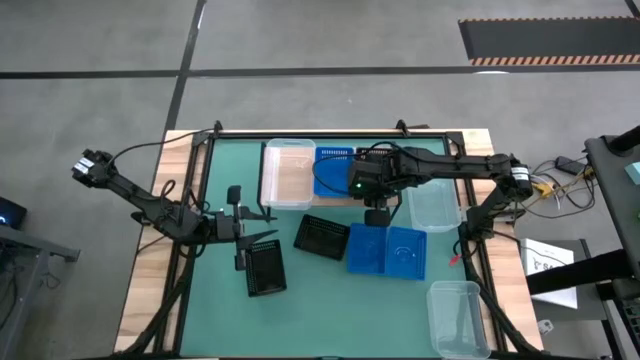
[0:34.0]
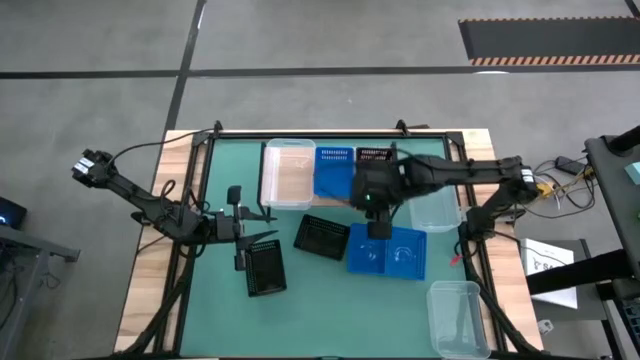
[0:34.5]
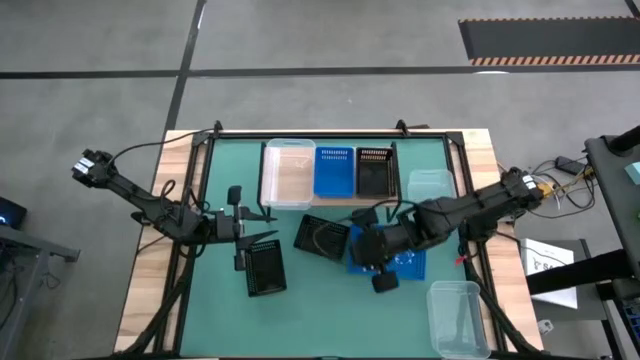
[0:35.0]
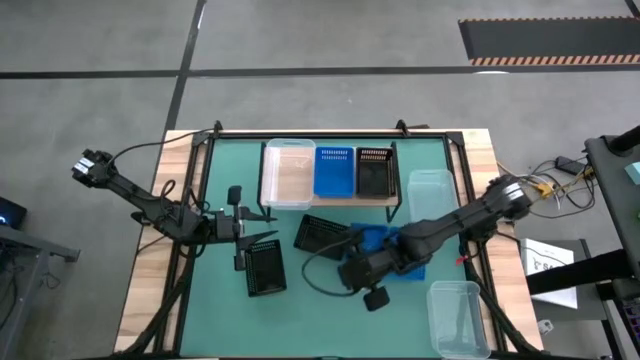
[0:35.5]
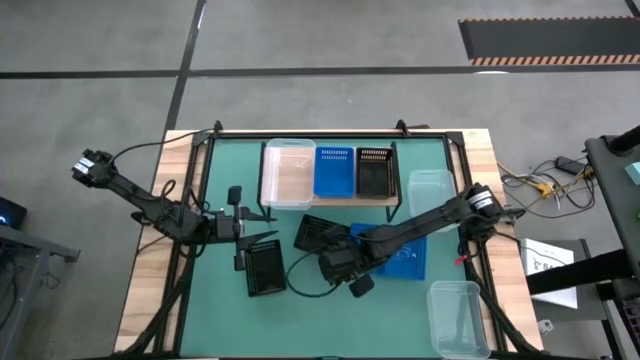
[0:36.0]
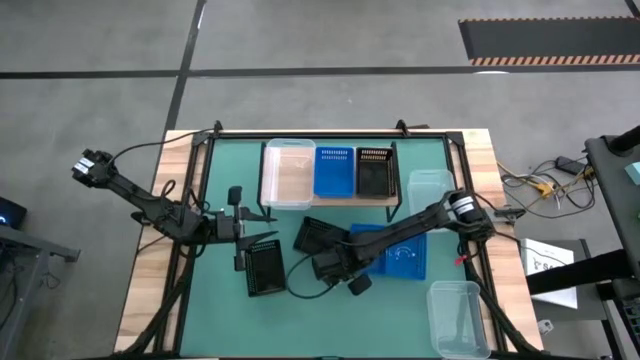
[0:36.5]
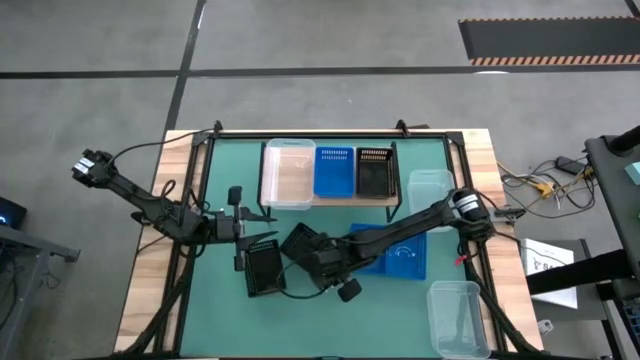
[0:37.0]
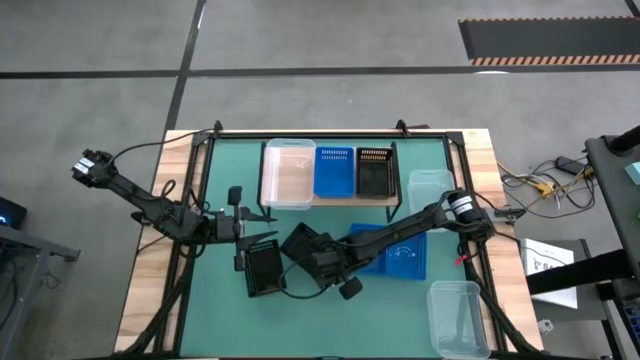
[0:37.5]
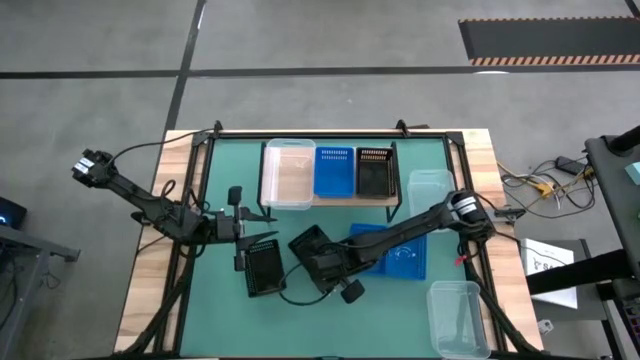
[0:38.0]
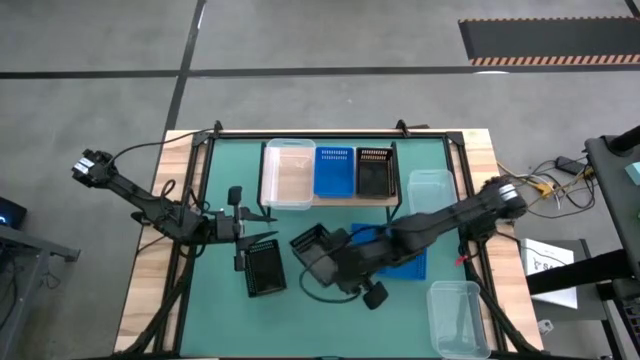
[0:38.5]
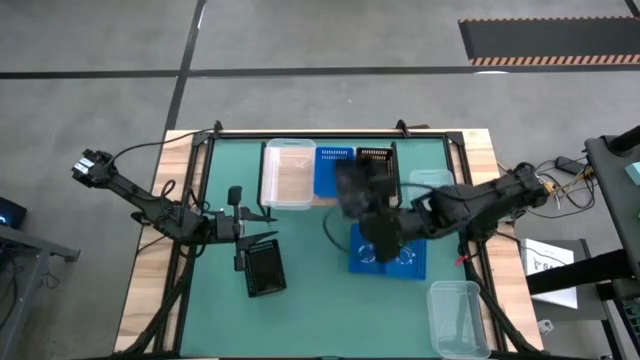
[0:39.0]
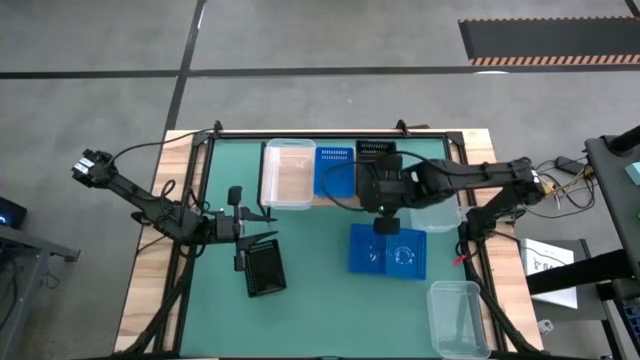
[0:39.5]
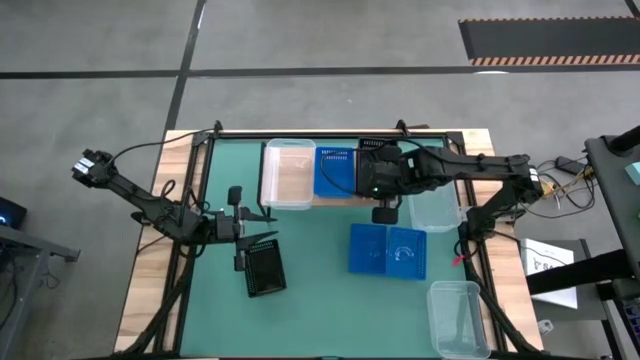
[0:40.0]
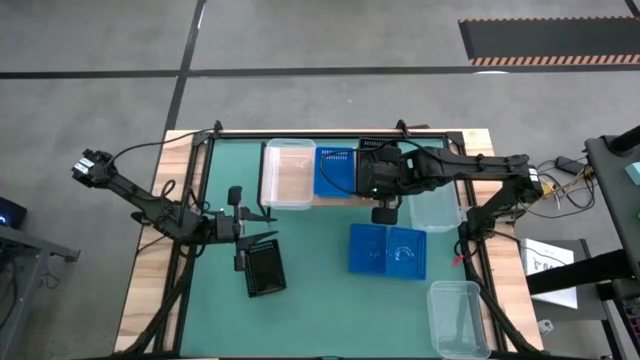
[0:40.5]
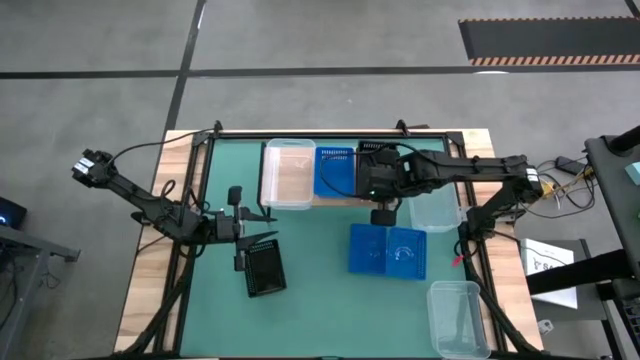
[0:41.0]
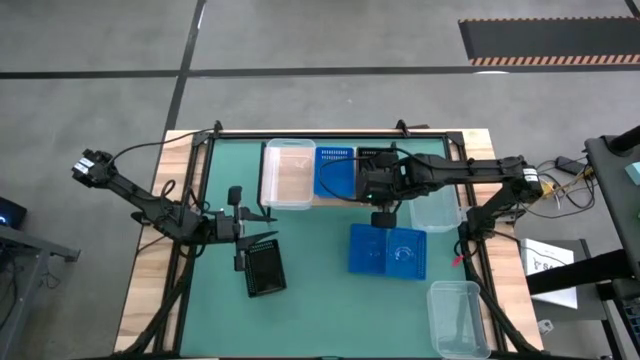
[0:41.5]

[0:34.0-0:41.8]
Task: Stack baskets on shelf by color
Stack the top black bin on top of the black bin on the shelf

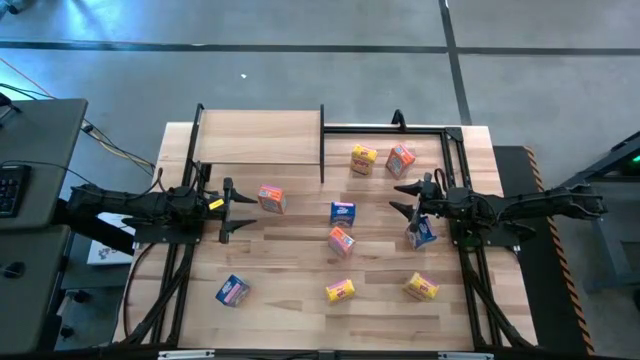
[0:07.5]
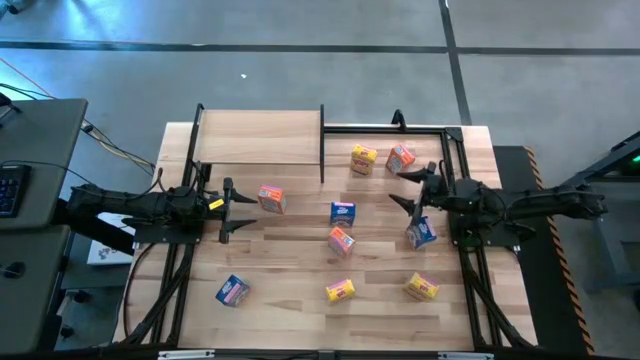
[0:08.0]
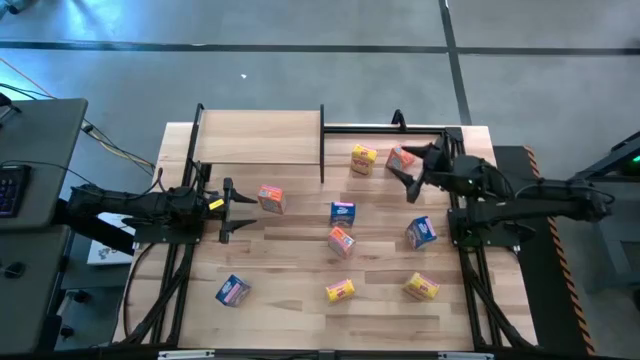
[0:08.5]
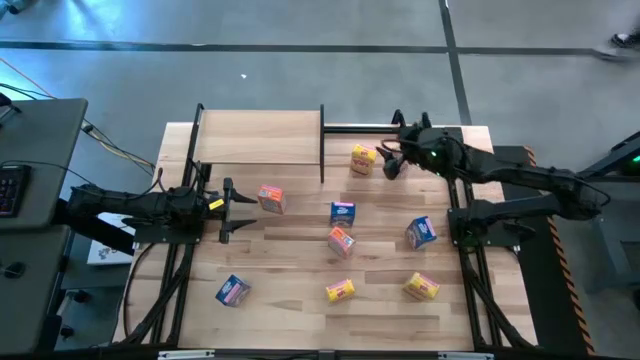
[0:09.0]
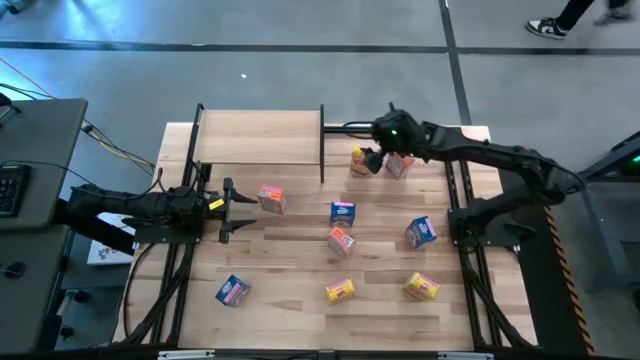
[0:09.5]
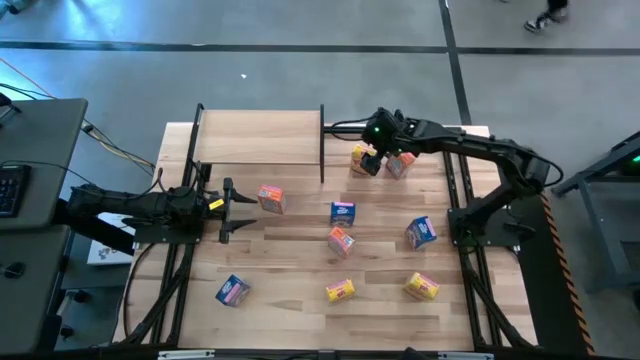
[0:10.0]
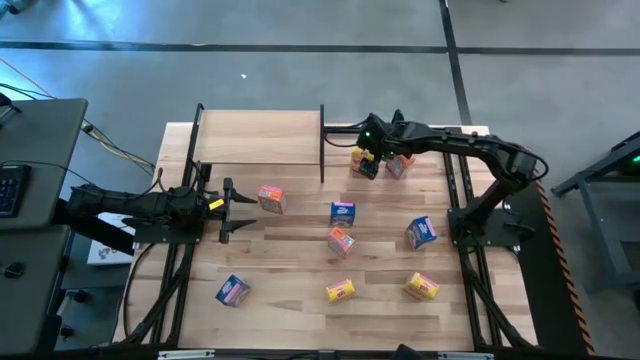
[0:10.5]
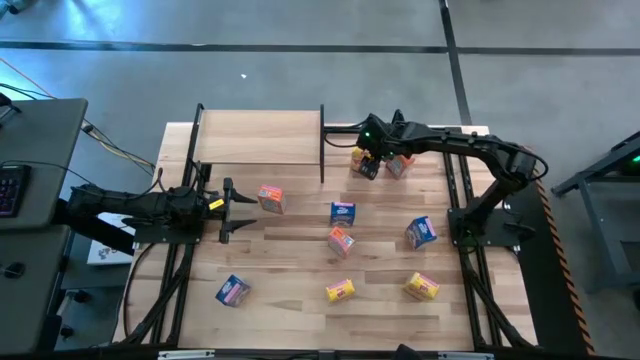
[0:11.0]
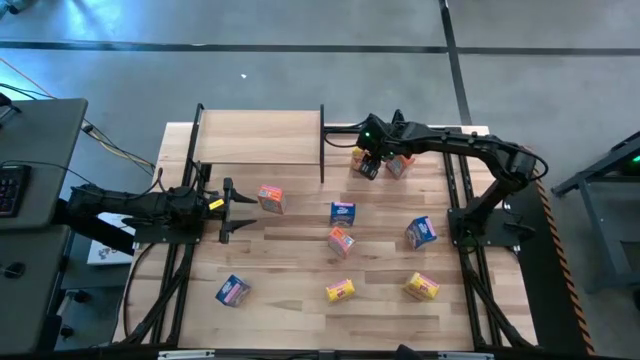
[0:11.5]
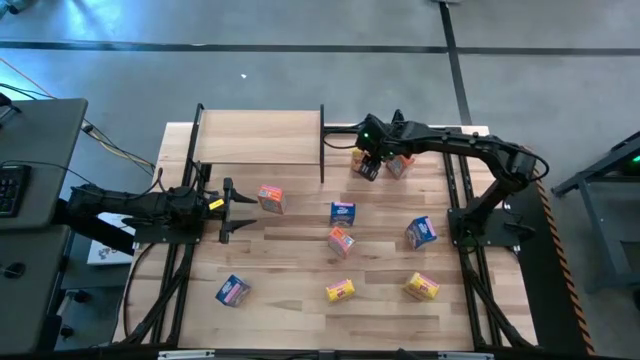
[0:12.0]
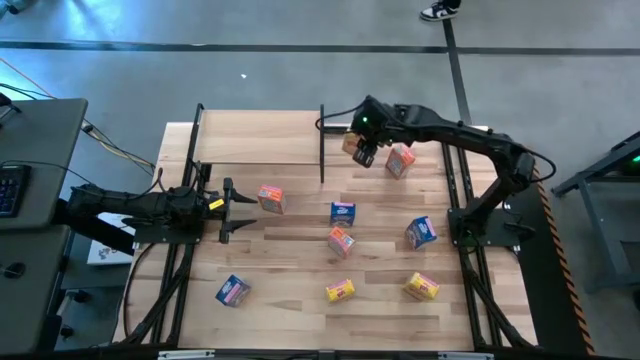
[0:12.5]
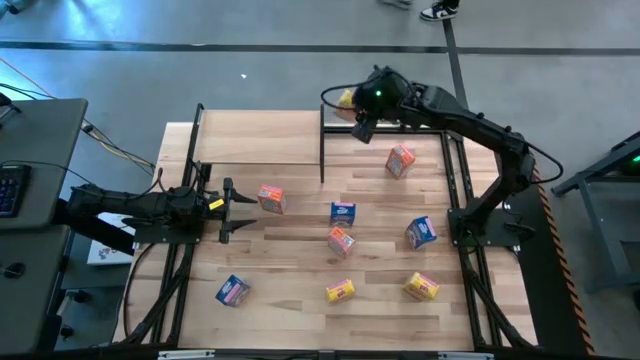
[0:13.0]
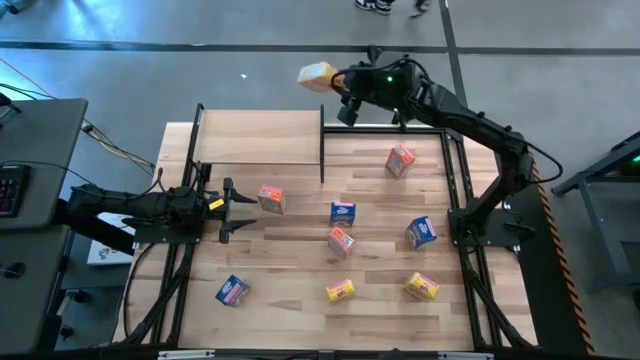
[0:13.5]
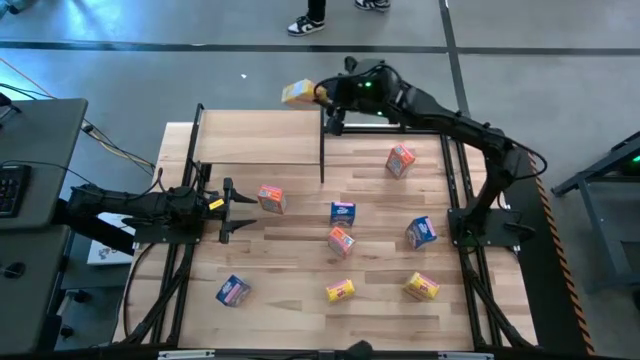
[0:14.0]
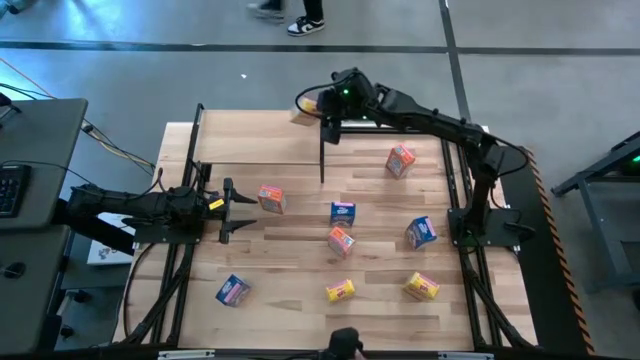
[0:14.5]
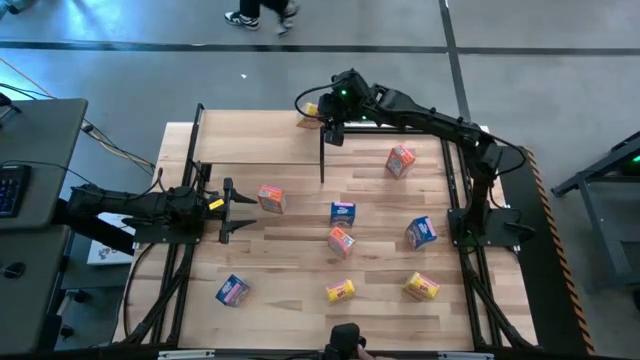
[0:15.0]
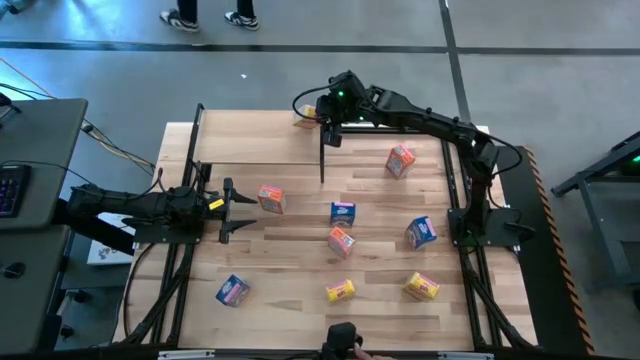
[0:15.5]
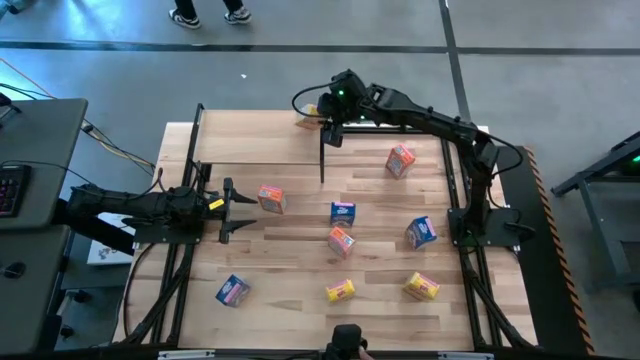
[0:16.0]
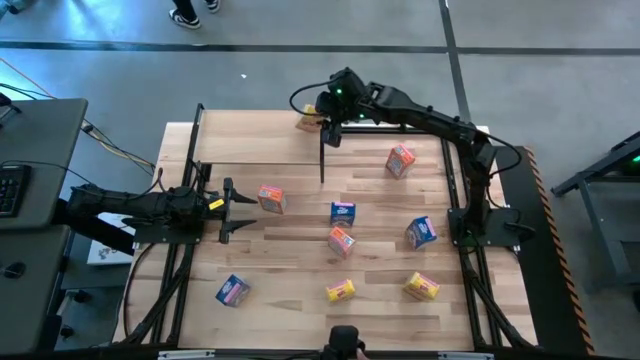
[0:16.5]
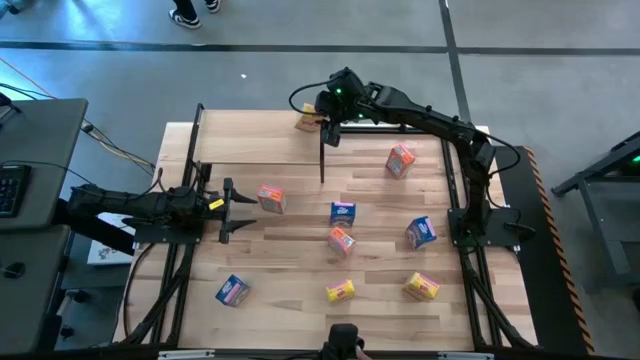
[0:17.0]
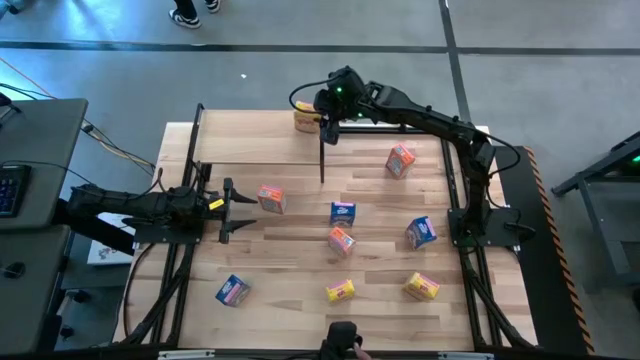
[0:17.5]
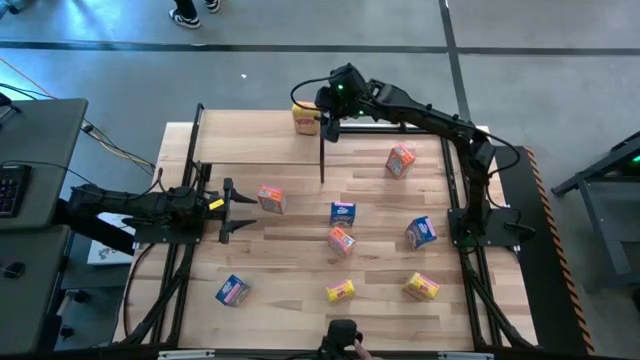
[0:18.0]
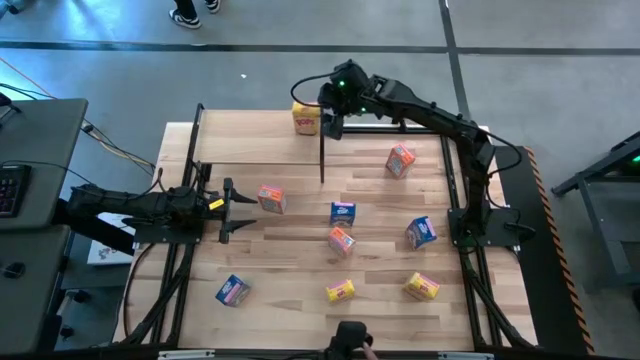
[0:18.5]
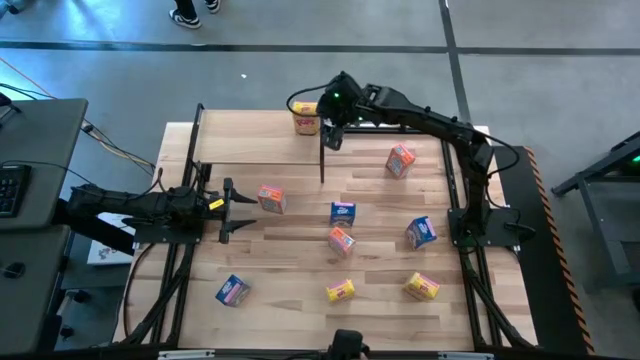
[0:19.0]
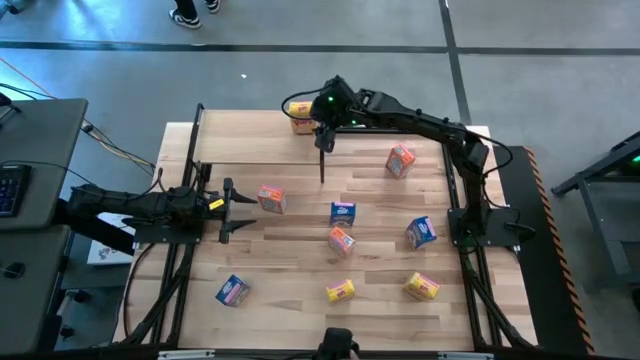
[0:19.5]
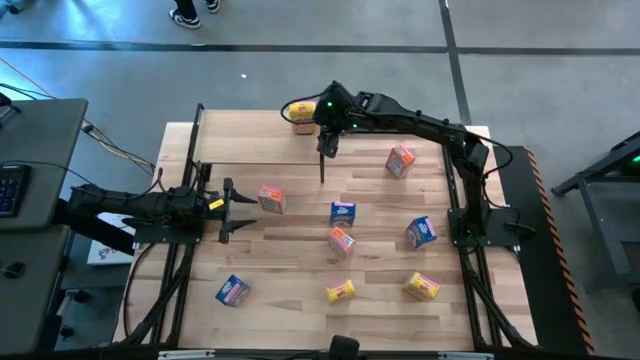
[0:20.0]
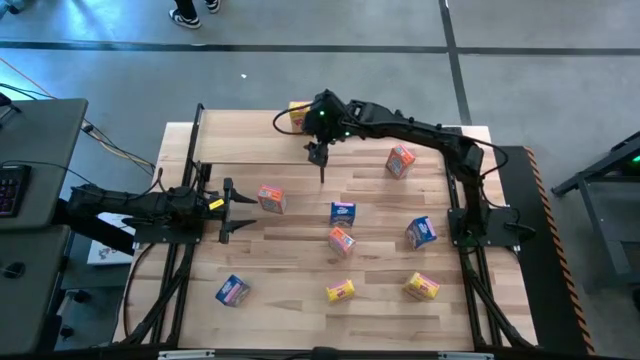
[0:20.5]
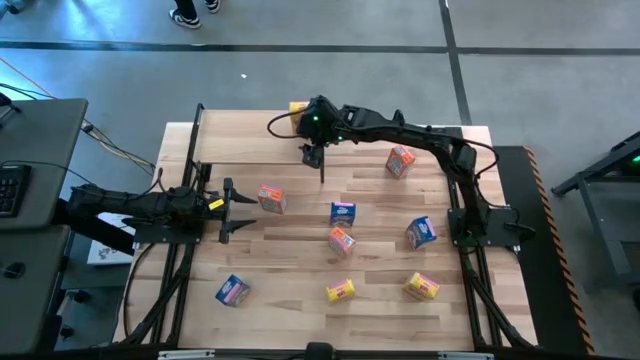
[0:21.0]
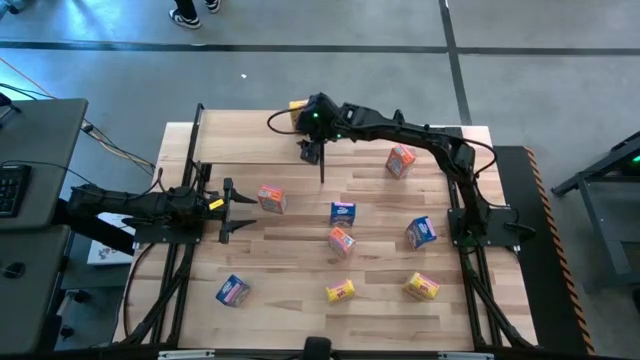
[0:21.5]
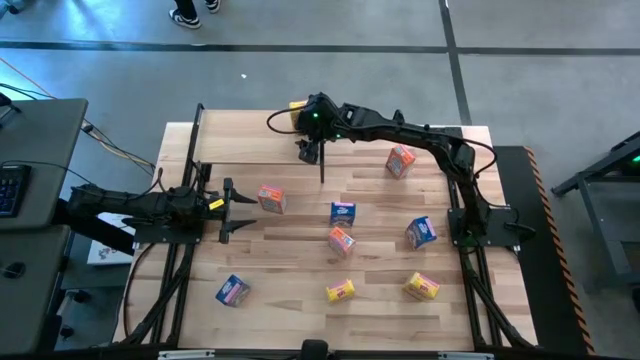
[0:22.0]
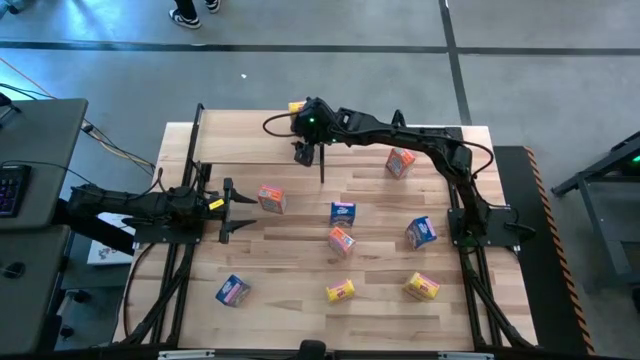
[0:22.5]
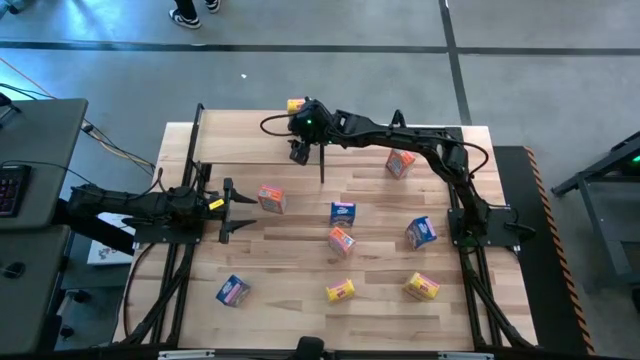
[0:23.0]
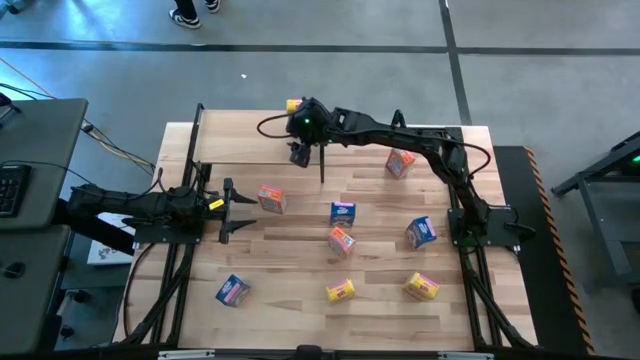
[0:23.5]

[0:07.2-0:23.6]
Task: Stack cereal on shelf
Put the top left yellow cereal box on the shelf
